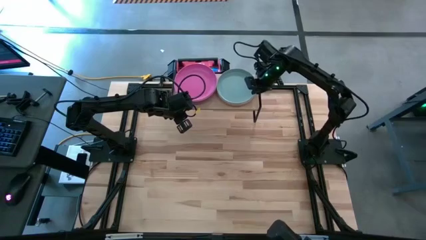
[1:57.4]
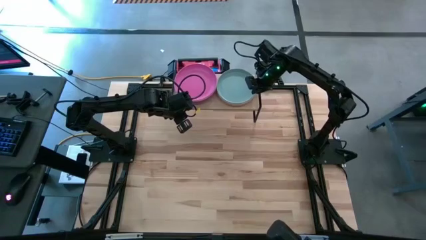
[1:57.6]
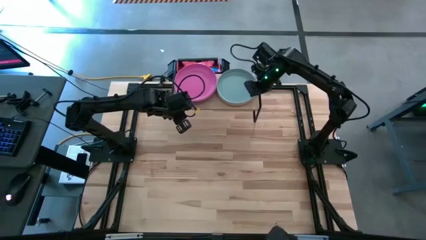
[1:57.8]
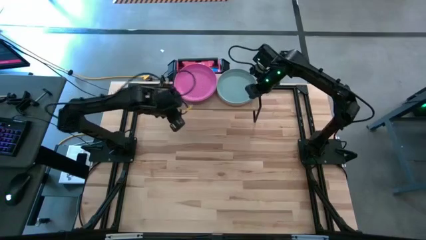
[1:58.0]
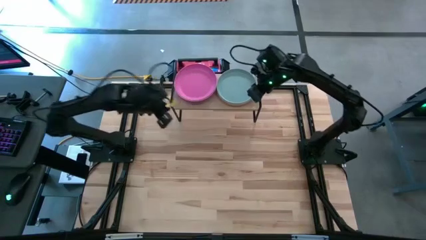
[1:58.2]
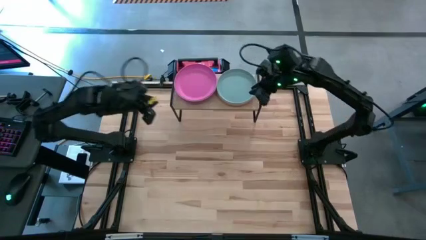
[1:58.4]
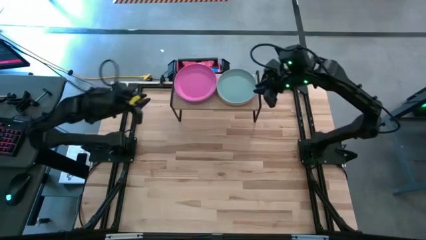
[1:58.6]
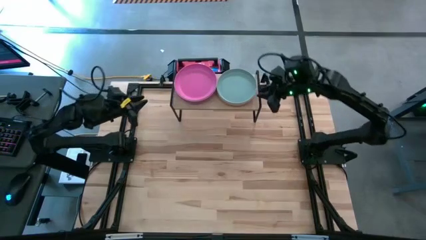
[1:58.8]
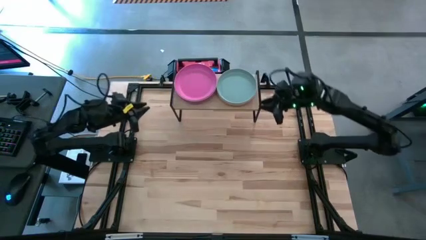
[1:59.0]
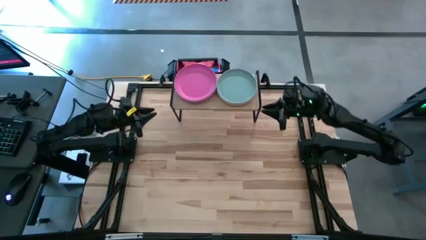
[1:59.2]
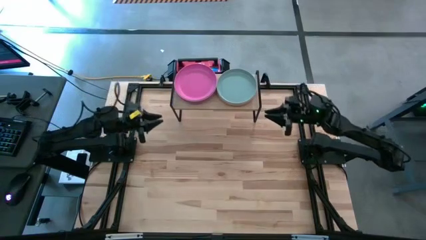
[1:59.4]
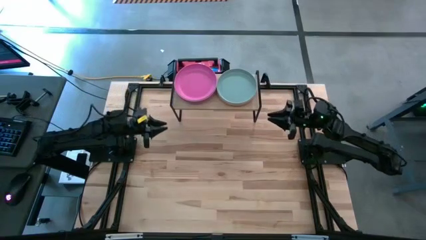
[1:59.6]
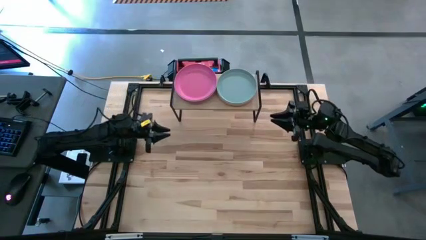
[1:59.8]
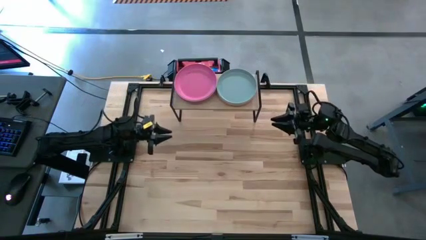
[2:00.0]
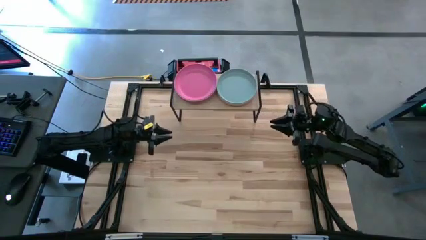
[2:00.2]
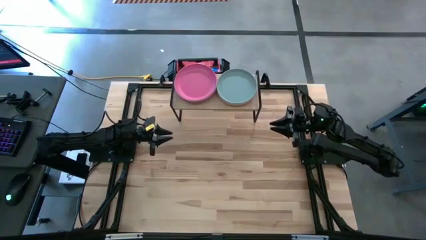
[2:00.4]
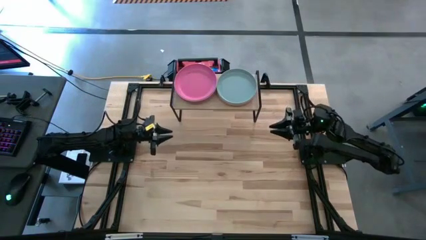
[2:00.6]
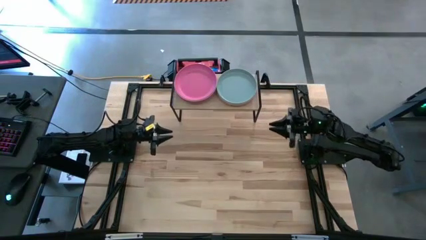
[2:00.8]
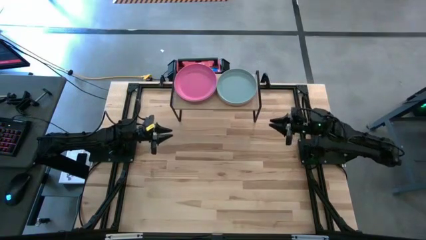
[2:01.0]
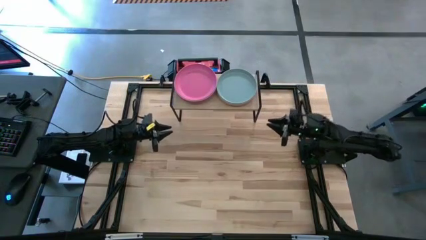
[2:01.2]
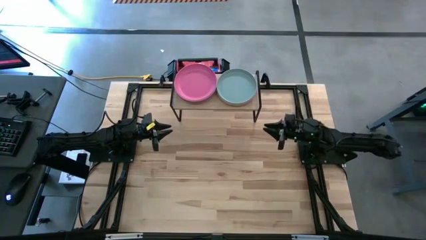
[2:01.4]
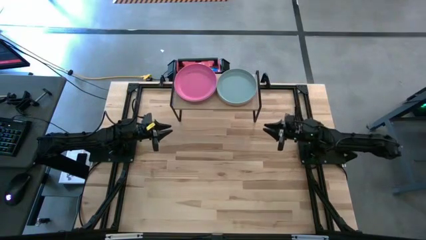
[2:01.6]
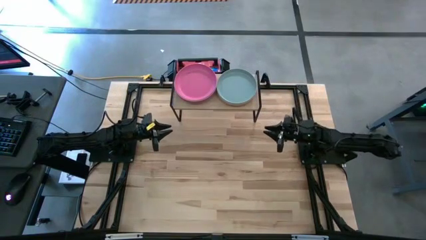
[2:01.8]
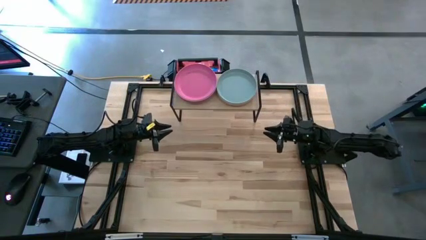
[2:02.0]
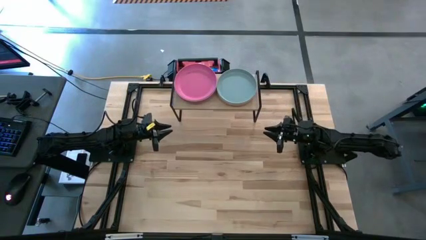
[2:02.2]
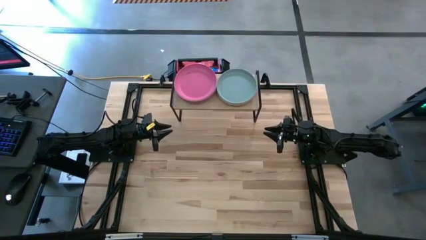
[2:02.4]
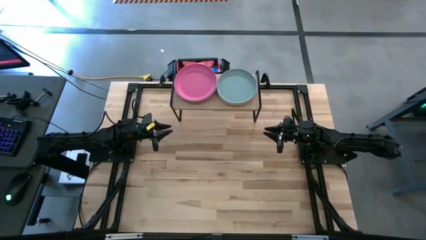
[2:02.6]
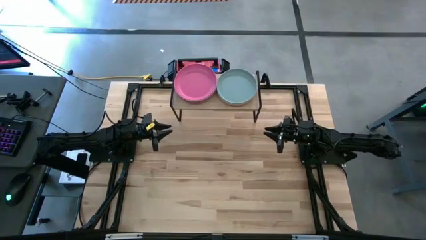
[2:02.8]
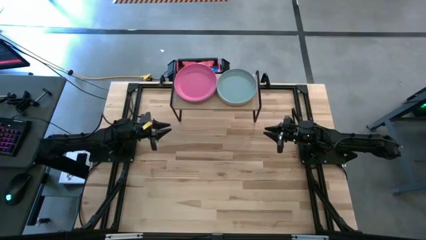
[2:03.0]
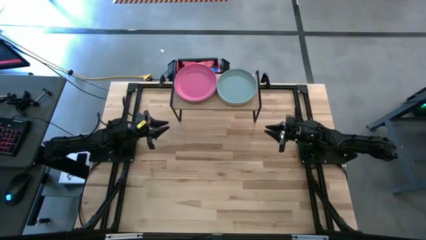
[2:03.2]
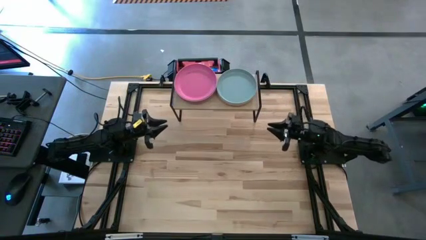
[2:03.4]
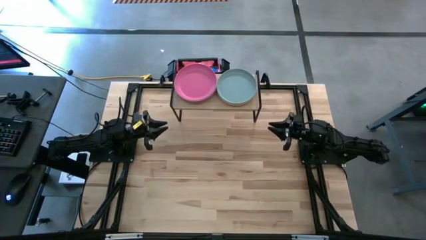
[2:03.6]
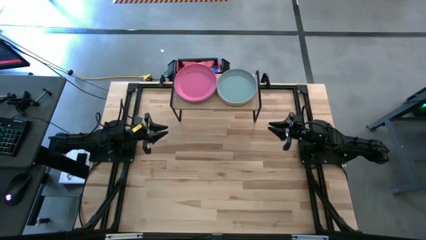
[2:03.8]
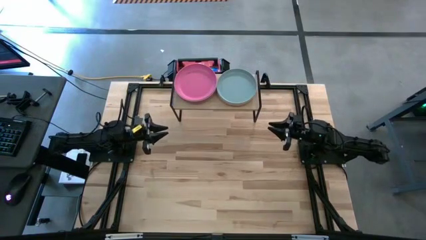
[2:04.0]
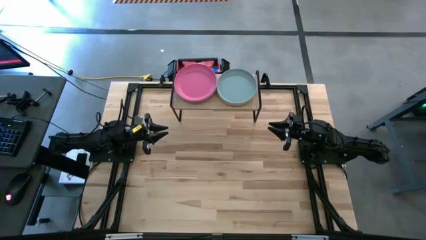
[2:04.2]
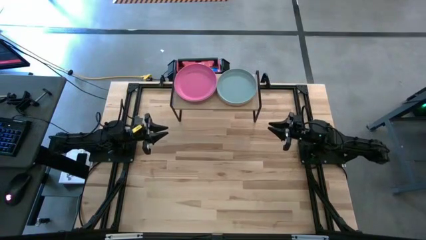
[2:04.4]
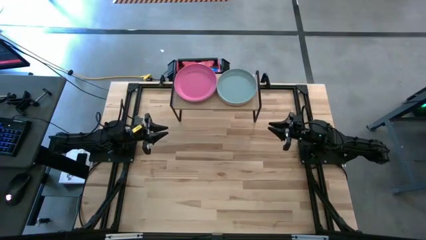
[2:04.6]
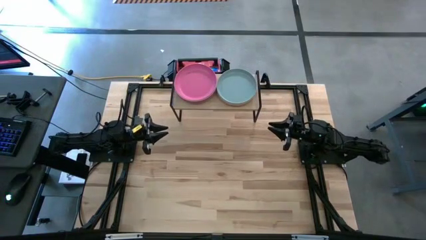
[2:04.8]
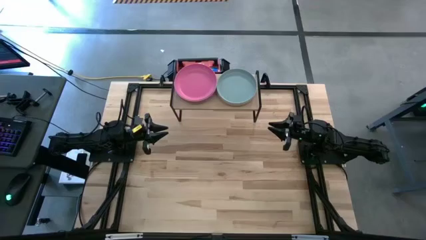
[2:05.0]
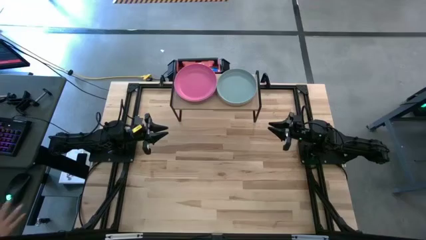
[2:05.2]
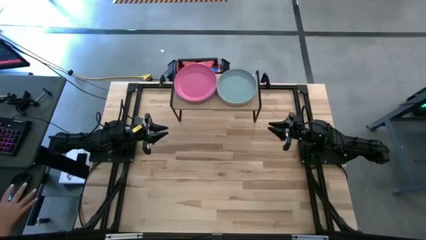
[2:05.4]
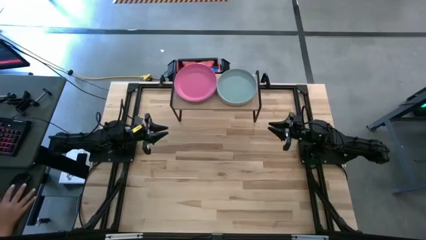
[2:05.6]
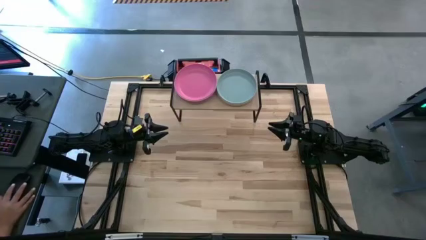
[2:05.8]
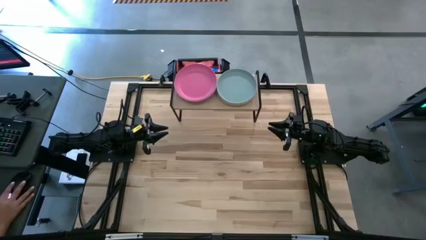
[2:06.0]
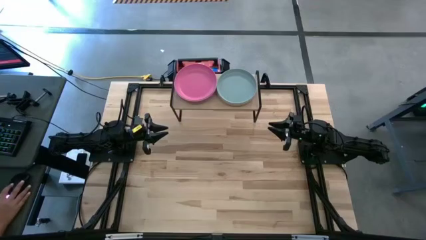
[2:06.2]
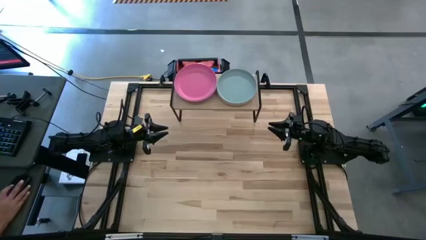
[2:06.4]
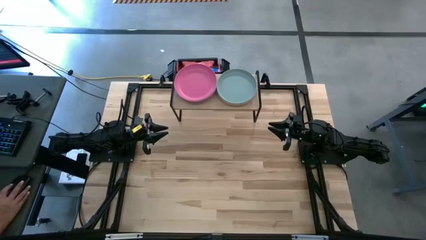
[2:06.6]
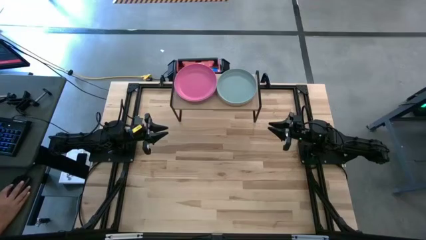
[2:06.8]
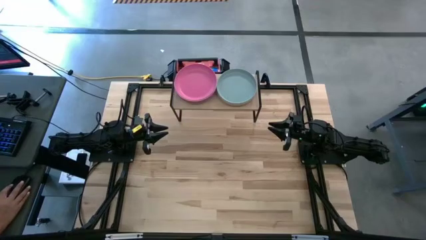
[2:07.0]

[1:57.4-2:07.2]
Task: Place and stack plates onto a shelf
Return to Home Position

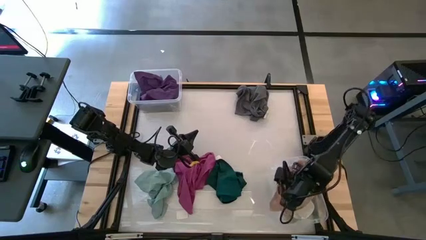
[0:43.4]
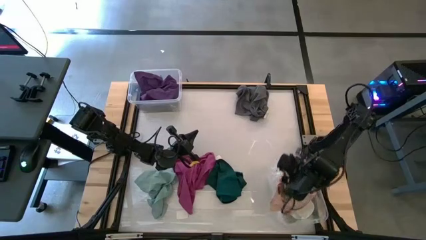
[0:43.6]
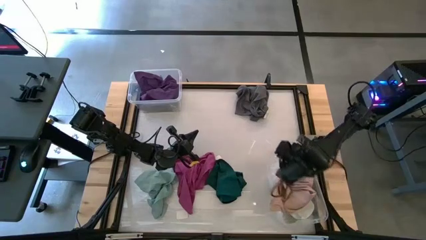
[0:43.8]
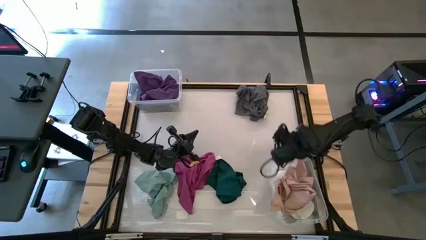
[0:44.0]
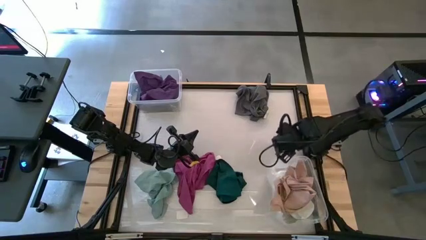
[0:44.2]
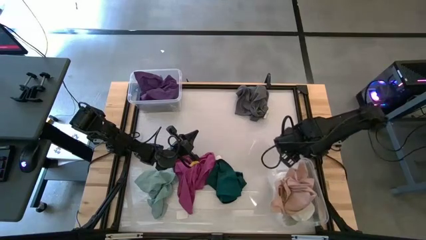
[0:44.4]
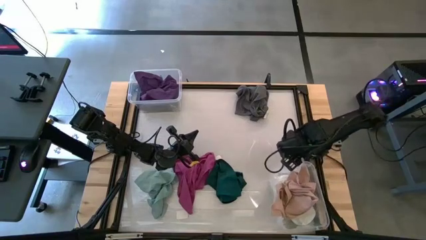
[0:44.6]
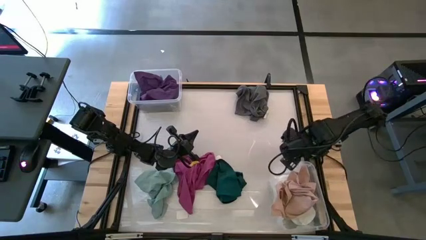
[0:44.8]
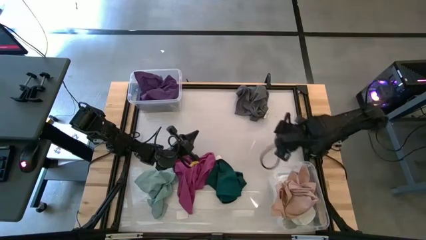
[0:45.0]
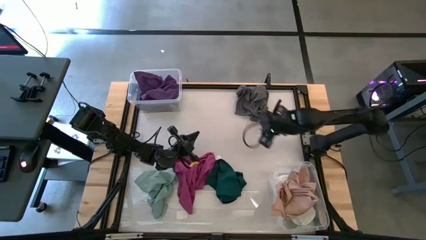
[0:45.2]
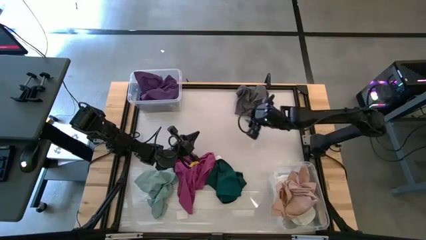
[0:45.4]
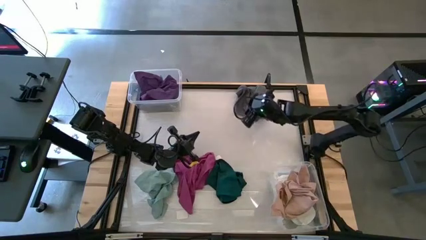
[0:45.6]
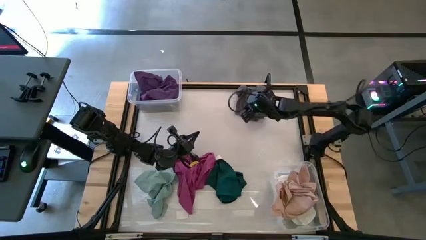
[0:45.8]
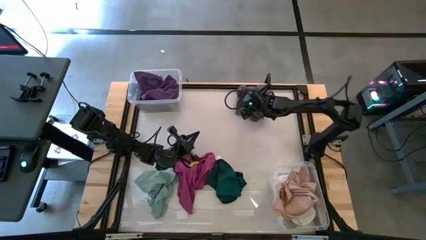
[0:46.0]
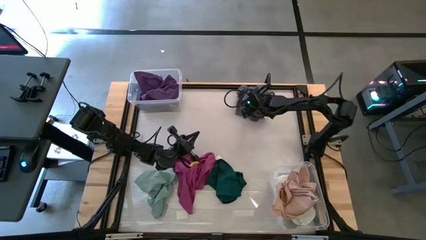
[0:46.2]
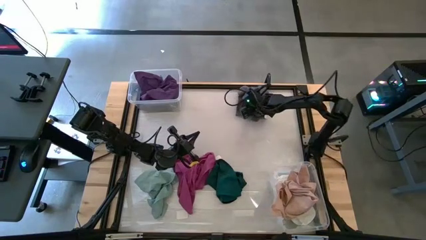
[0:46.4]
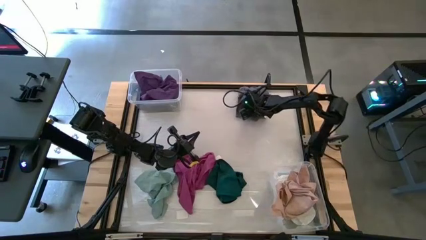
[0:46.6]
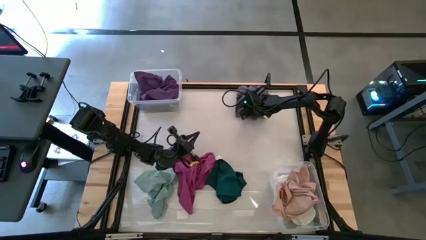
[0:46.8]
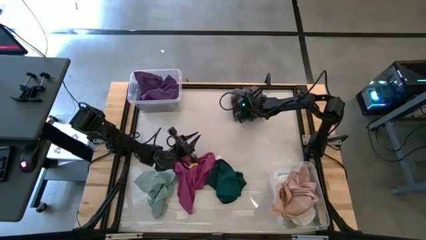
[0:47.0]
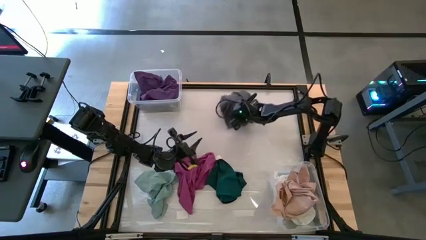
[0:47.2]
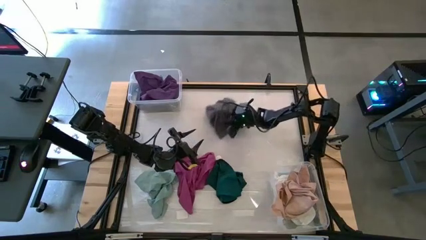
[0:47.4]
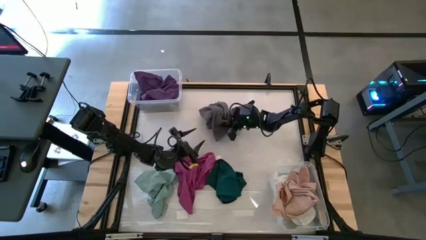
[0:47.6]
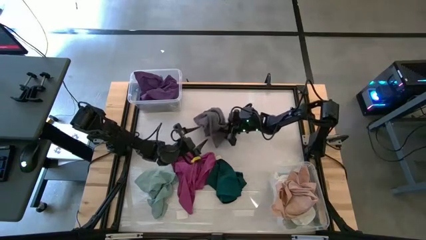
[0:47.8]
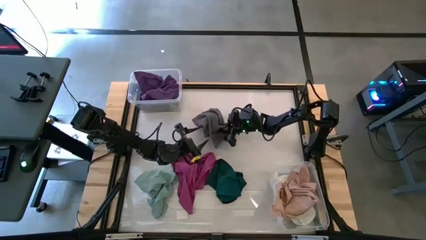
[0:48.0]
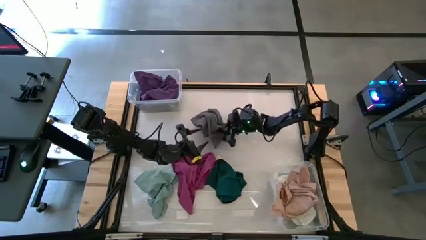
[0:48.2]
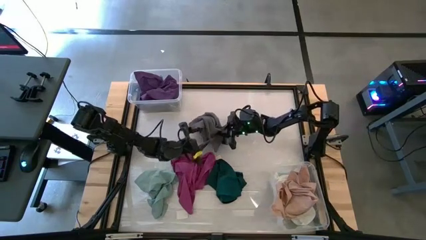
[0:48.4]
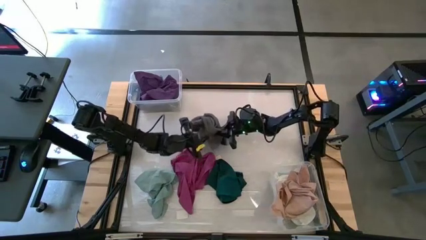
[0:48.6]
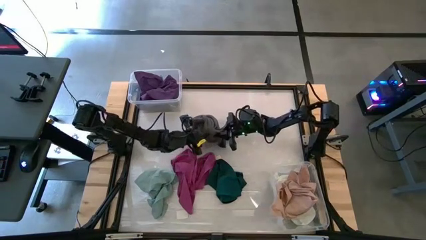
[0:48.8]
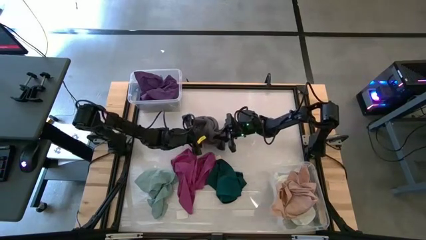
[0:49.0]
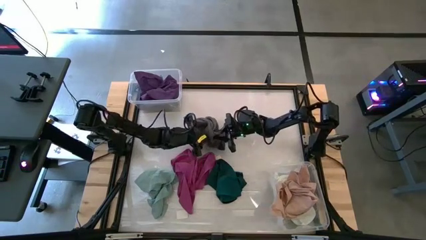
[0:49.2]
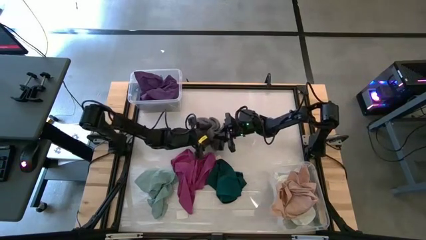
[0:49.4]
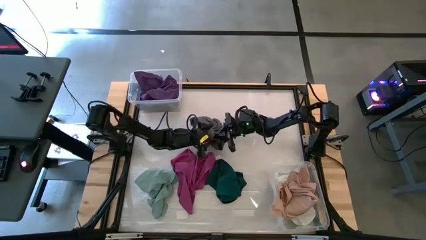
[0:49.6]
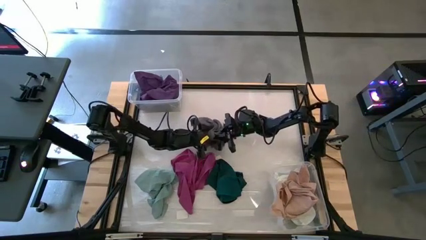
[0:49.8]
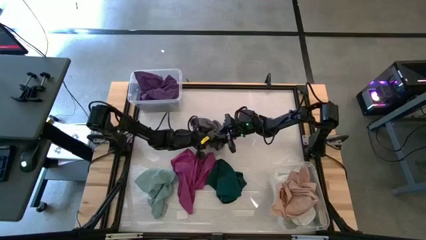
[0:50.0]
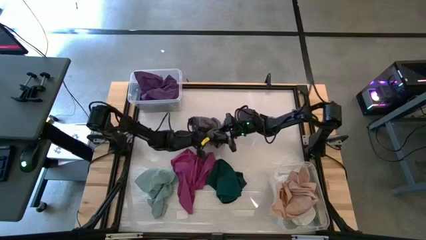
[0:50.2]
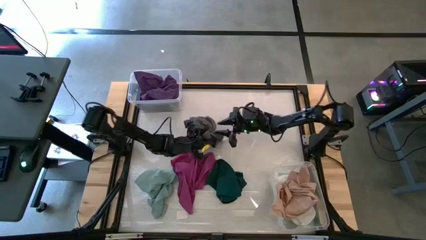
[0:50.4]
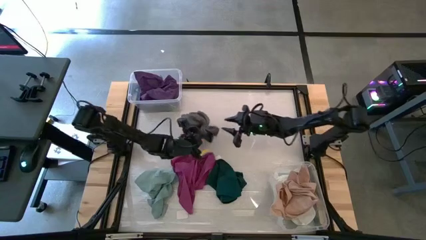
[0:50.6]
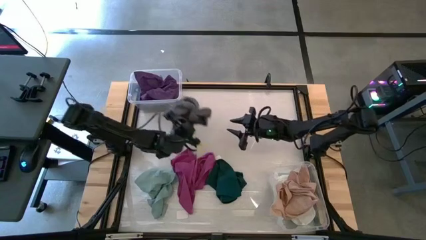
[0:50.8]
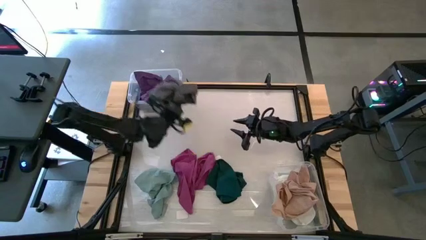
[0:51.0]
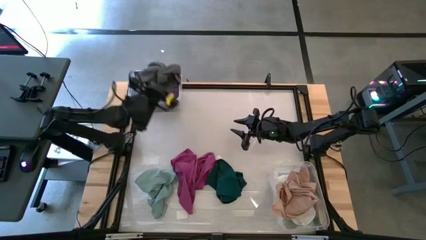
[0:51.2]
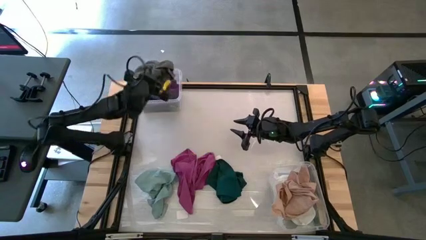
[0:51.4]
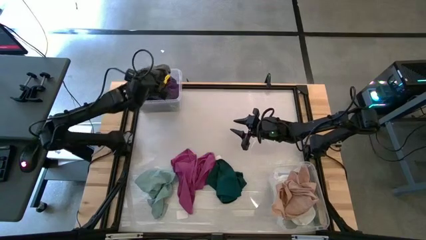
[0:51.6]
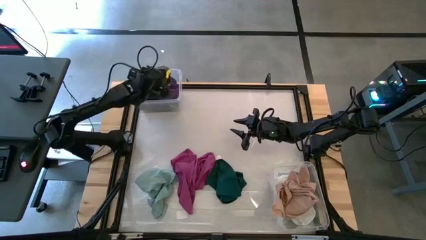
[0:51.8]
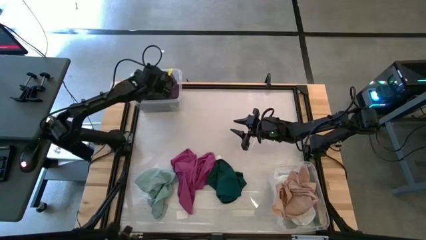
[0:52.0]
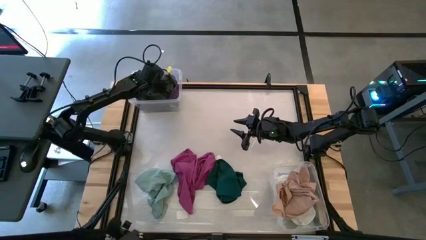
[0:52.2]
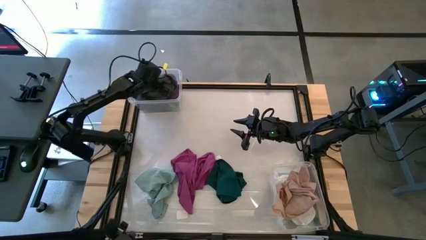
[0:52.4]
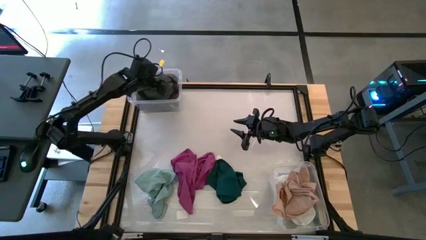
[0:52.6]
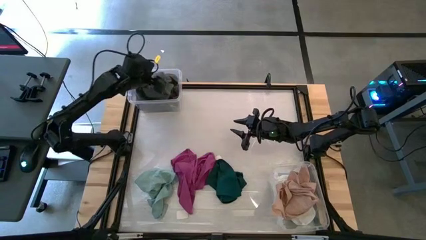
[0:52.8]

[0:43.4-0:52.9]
Task: Sort microfiber towel by color & place in baskets
Put the gray towel into the top transparent bin
